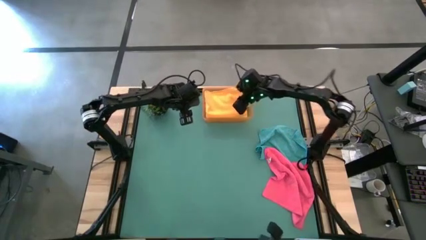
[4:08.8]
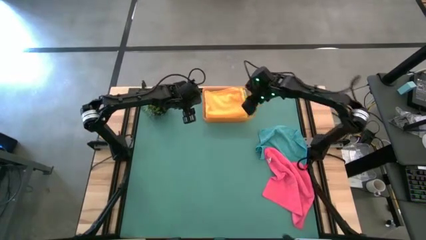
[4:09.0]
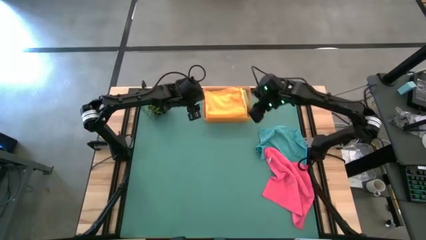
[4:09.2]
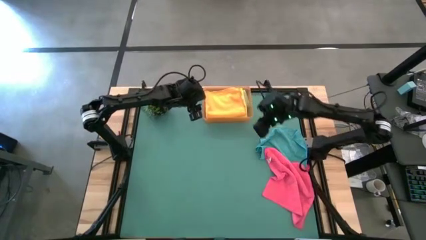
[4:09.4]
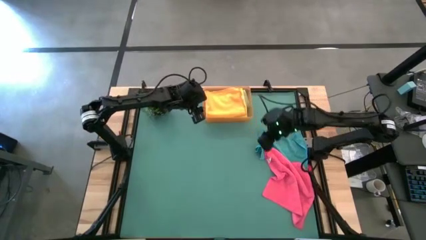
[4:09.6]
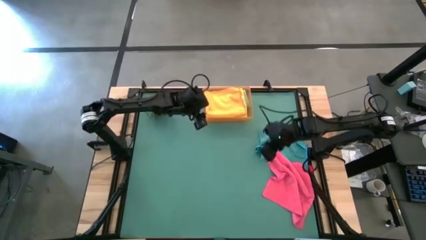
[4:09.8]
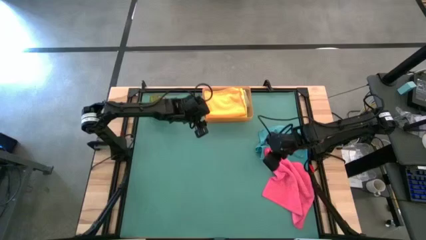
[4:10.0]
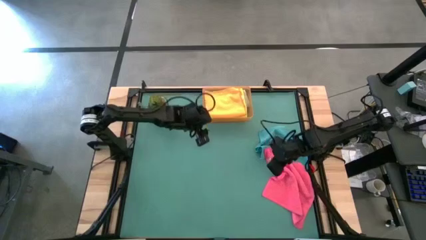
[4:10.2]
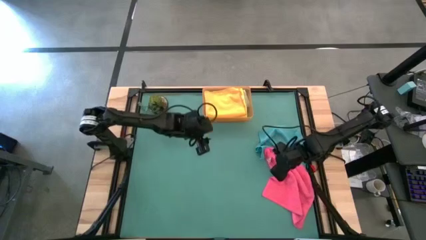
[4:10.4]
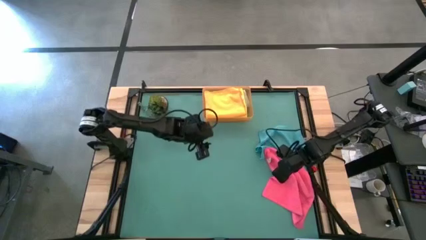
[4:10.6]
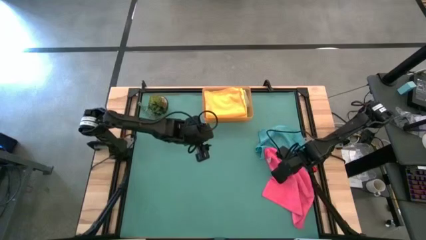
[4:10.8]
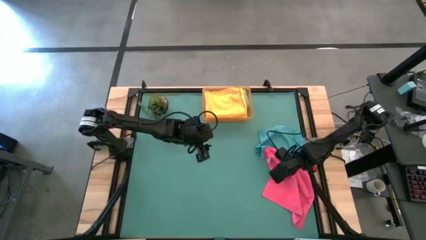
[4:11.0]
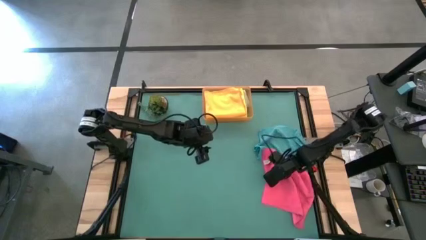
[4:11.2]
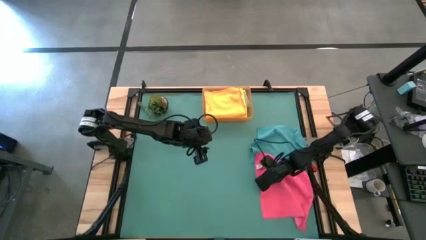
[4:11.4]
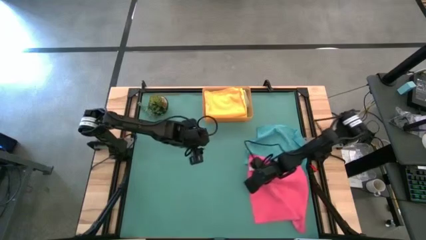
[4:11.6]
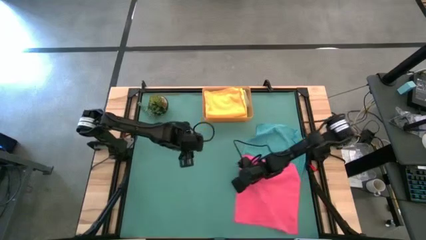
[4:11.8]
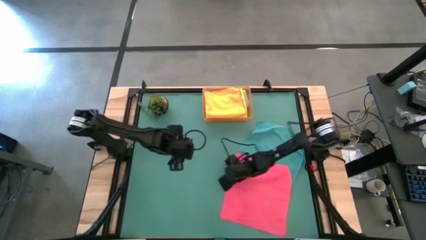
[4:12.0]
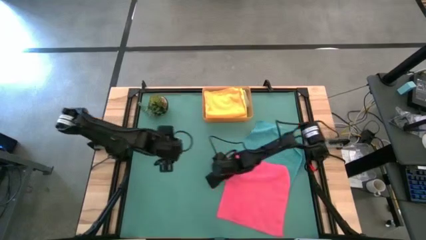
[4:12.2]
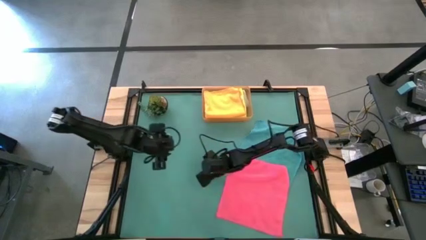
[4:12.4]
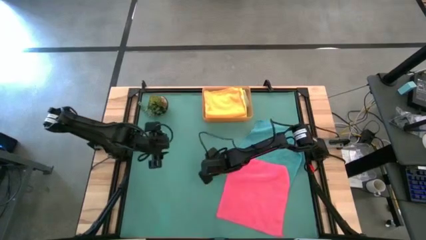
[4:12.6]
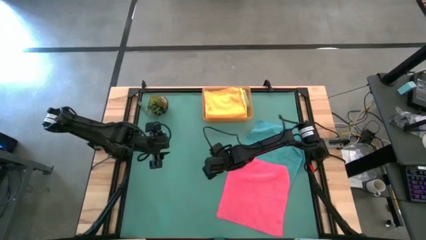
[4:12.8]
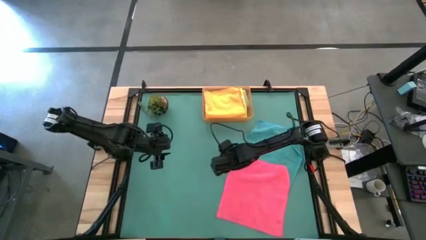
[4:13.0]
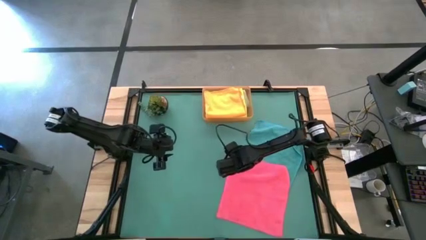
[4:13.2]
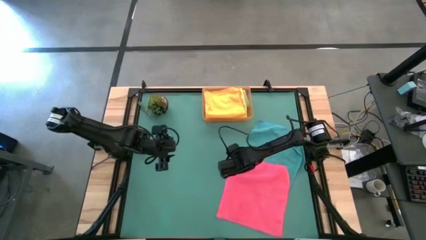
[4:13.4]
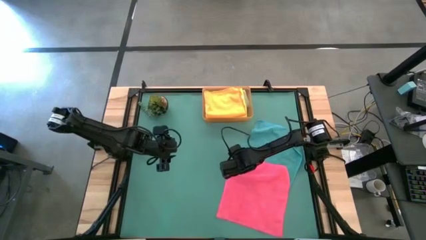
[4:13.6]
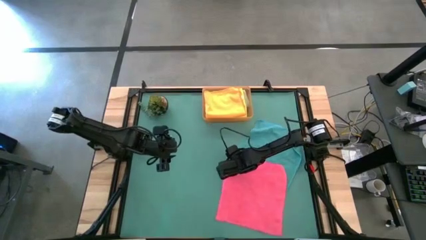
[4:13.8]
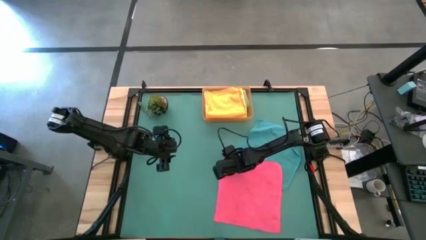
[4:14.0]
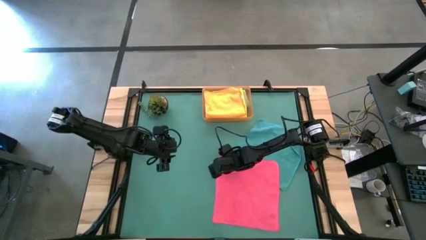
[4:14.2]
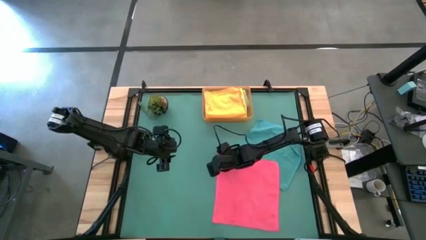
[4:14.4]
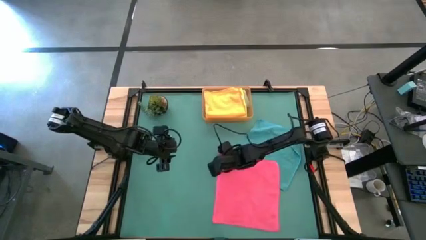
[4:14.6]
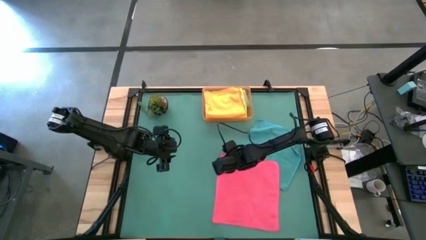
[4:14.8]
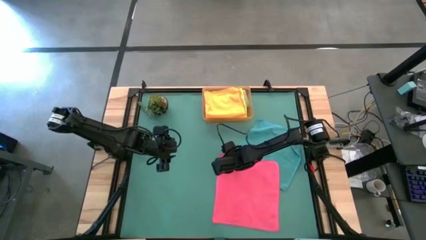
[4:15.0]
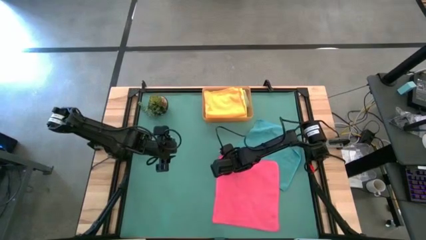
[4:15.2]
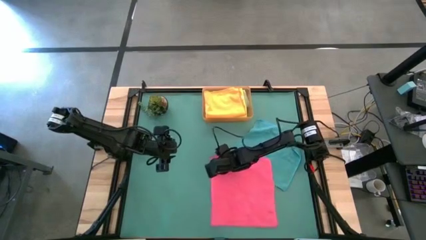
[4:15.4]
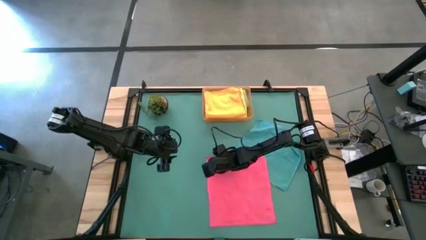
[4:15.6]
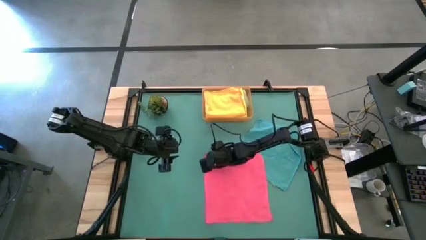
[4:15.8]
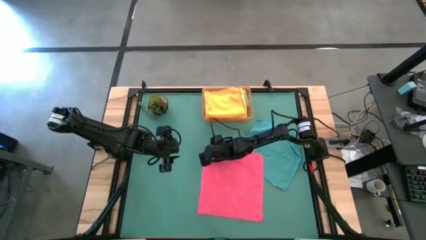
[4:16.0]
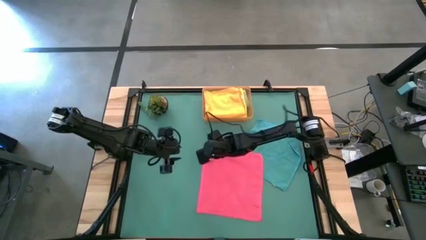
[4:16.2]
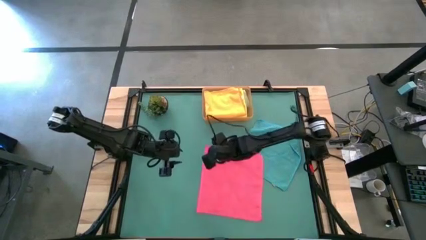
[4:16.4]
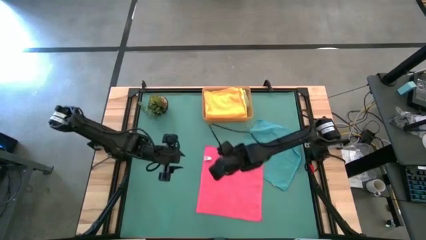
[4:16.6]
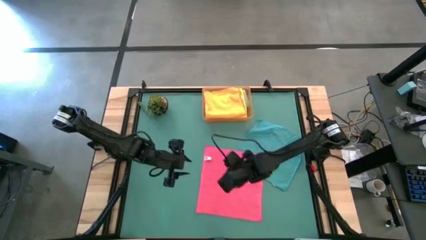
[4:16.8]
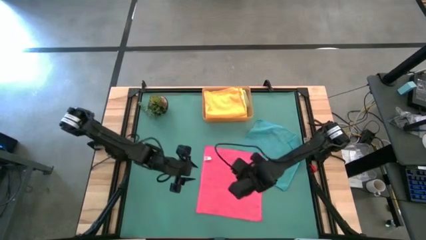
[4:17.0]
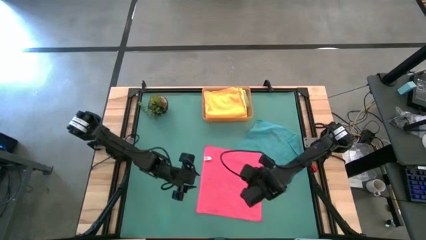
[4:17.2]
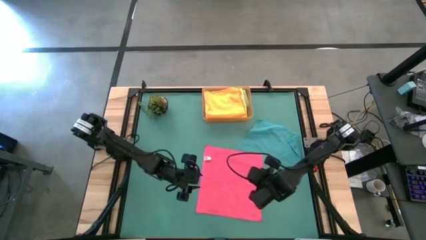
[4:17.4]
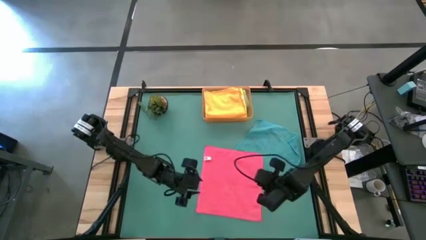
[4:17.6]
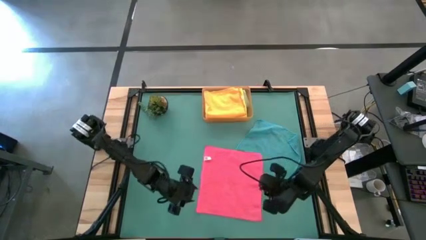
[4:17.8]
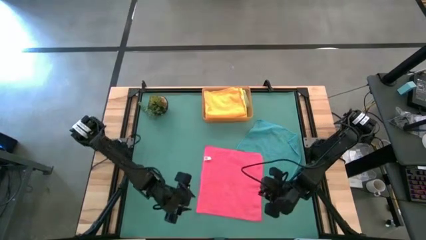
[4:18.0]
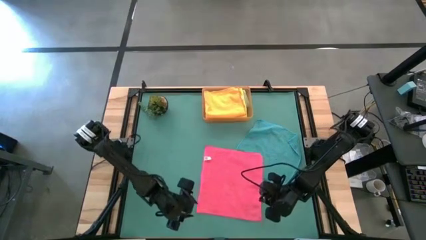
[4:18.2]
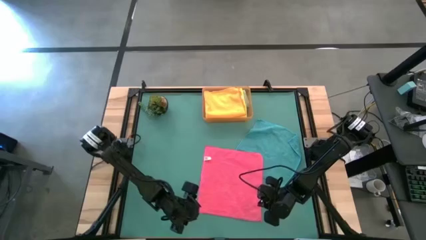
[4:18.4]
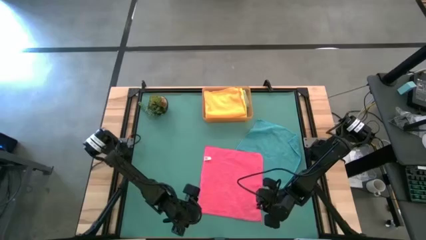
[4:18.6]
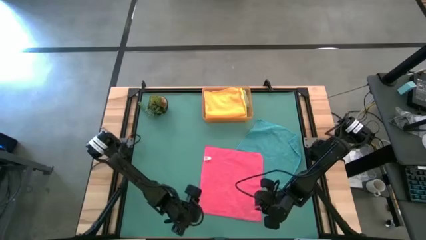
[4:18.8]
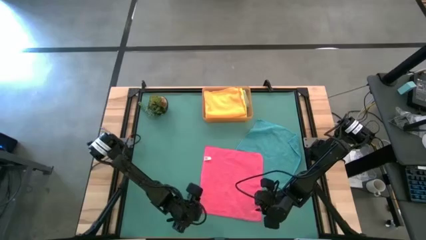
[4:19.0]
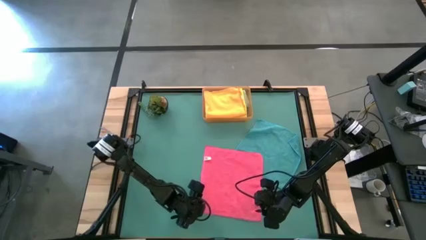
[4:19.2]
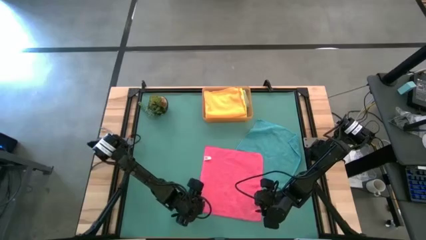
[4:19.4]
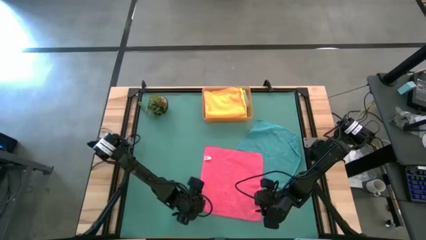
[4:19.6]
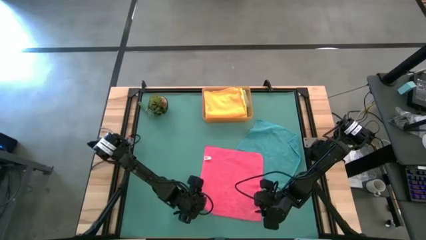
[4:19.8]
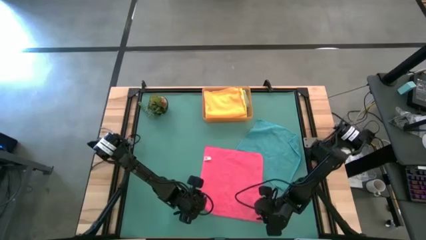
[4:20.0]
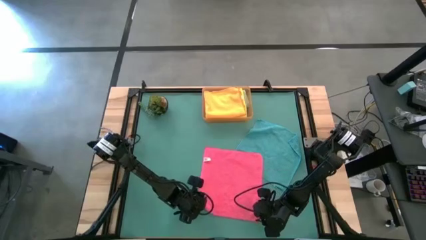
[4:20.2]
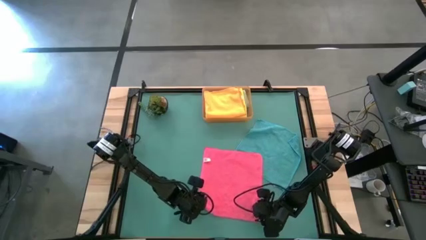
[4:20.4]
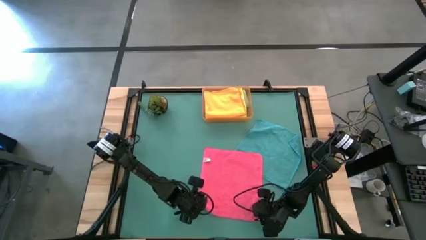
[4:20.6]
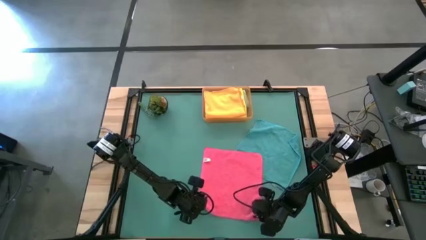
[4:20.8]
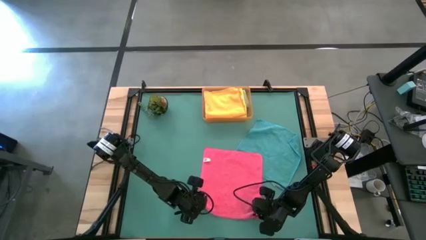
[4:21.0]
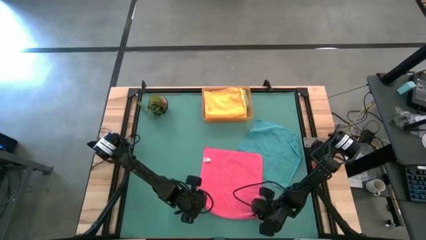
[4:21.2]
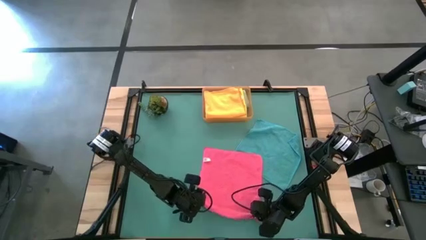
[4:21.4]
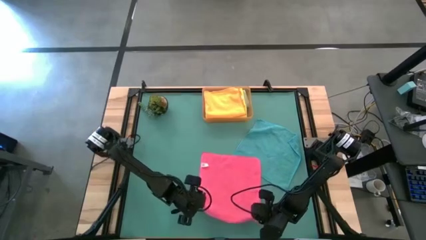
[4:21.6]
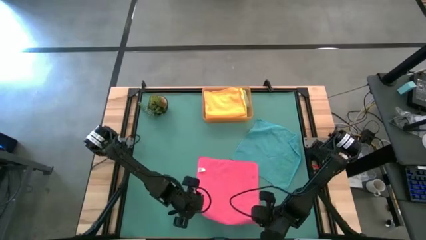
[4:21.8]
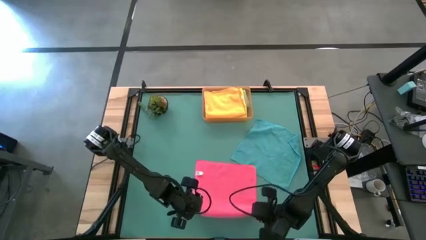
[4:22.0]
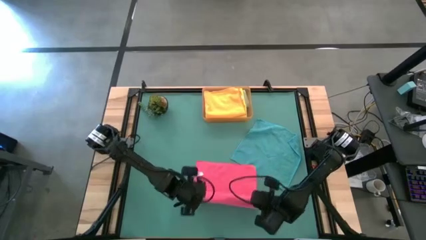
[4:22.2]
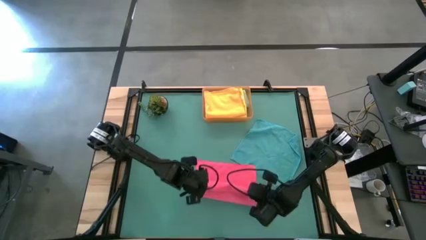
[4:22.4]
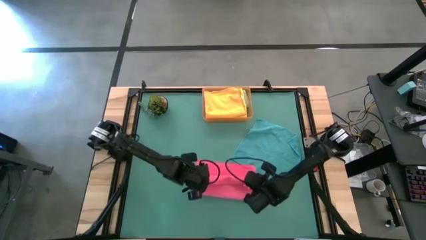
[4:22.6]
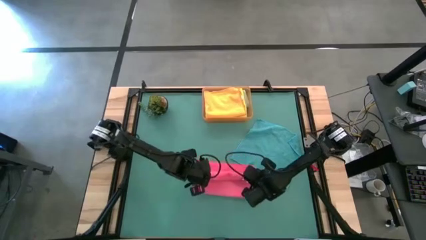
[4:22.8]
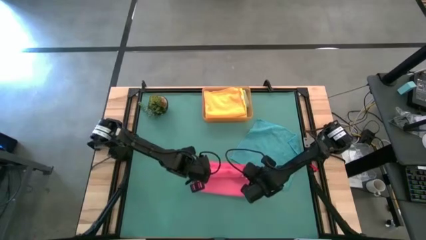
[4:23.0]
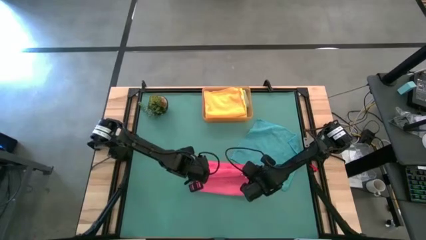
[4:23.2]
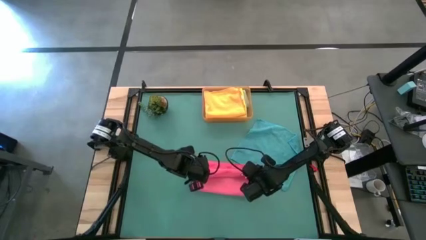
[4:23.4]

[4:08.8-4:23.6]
Task: Fold microfiber towels
Fold the pink towel
